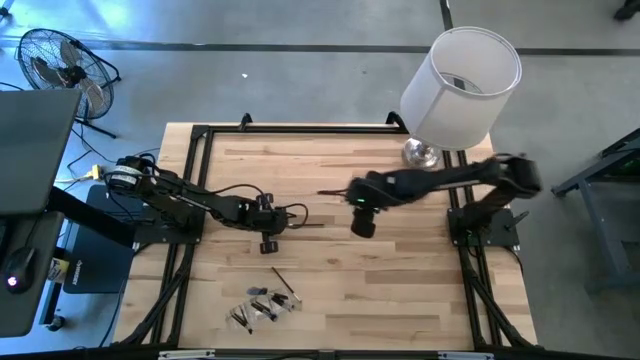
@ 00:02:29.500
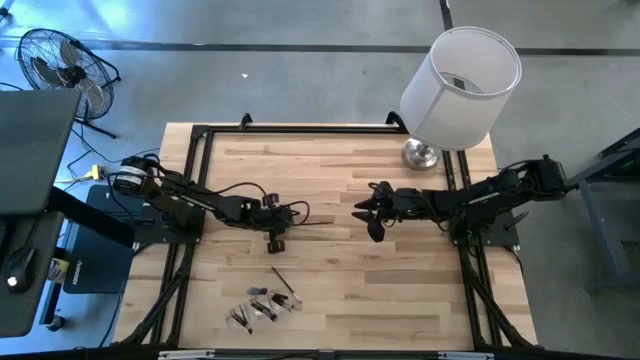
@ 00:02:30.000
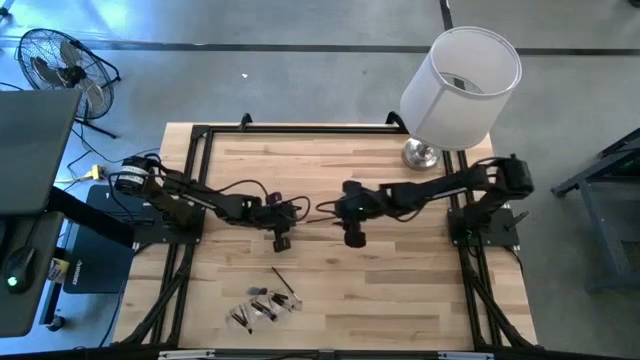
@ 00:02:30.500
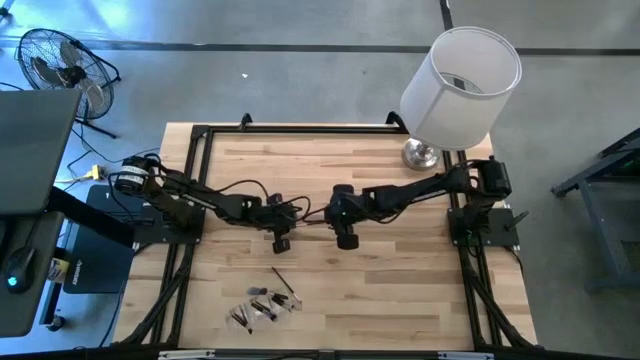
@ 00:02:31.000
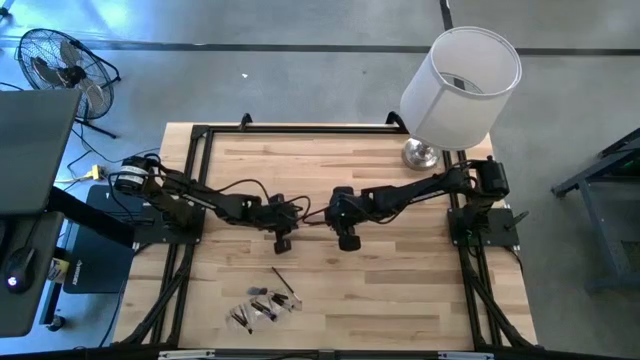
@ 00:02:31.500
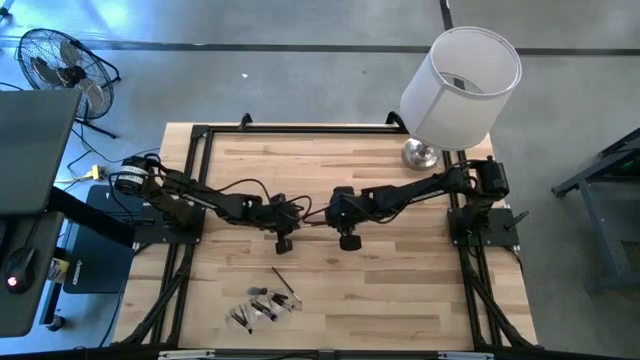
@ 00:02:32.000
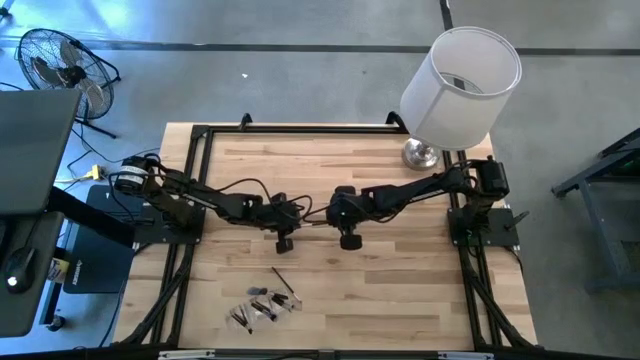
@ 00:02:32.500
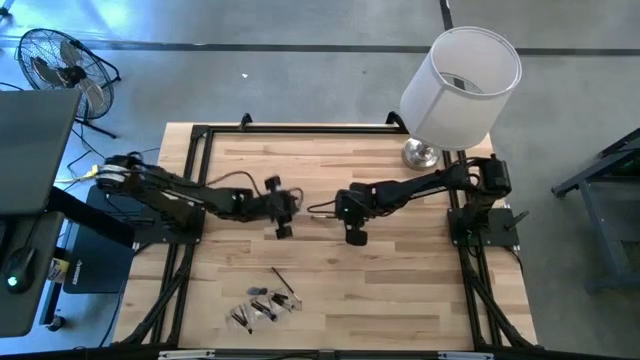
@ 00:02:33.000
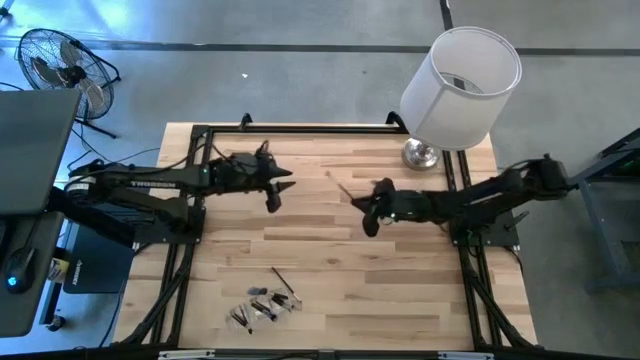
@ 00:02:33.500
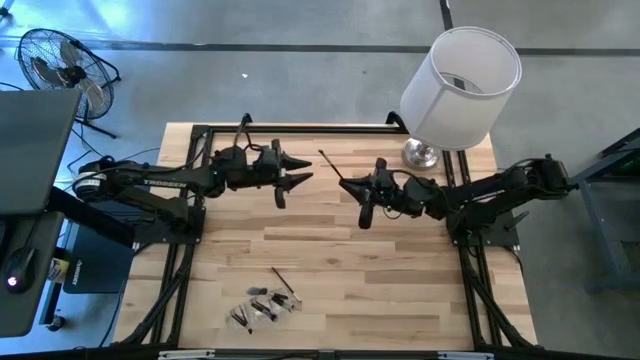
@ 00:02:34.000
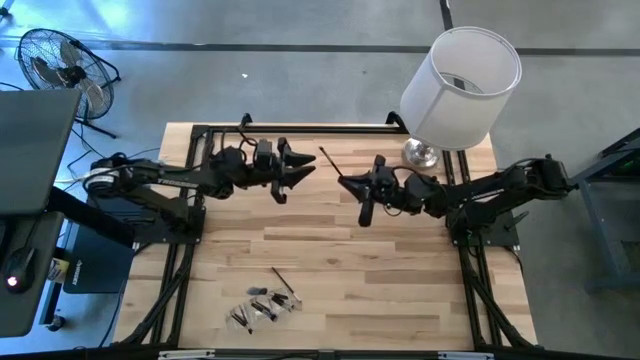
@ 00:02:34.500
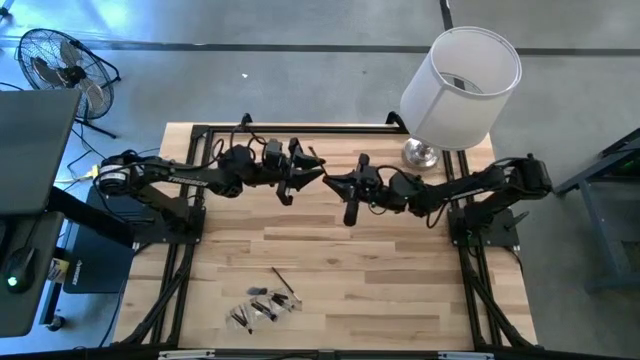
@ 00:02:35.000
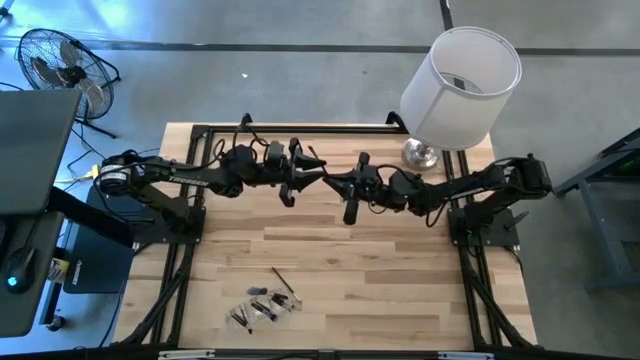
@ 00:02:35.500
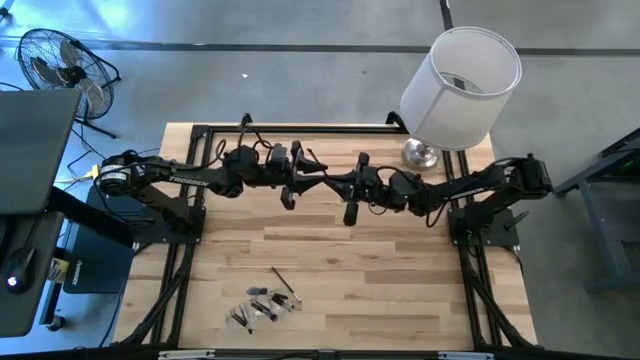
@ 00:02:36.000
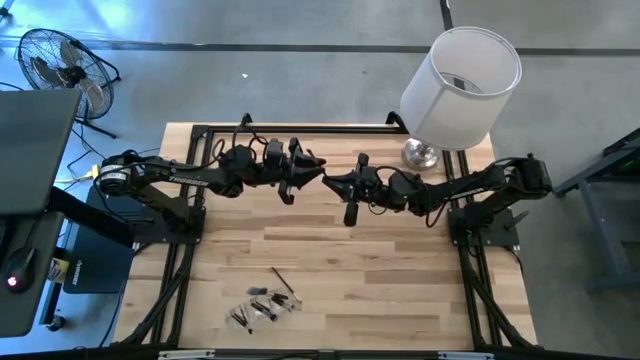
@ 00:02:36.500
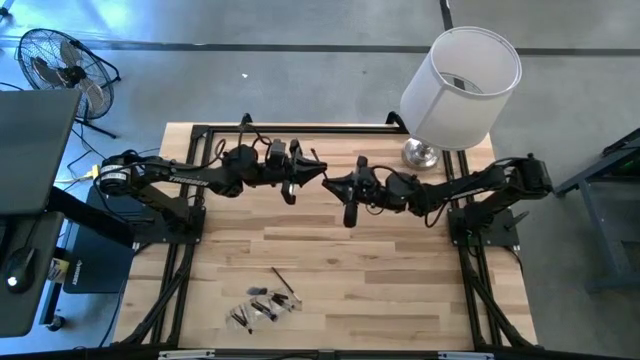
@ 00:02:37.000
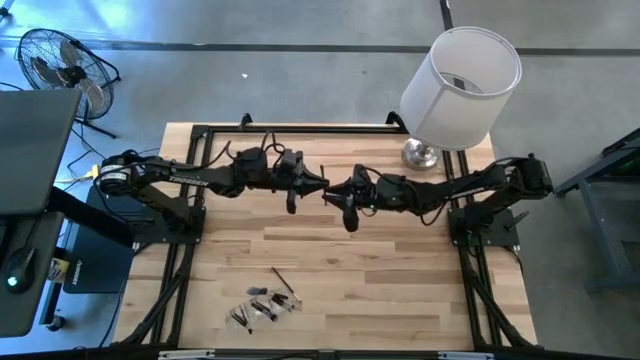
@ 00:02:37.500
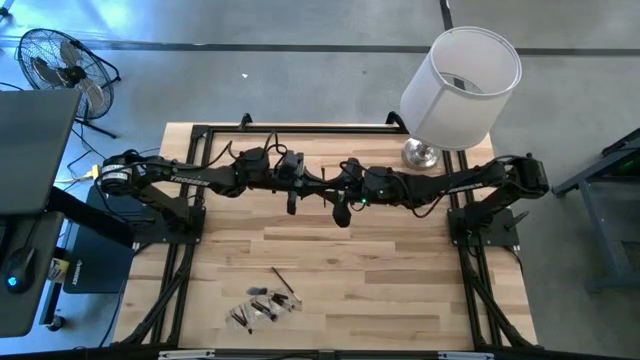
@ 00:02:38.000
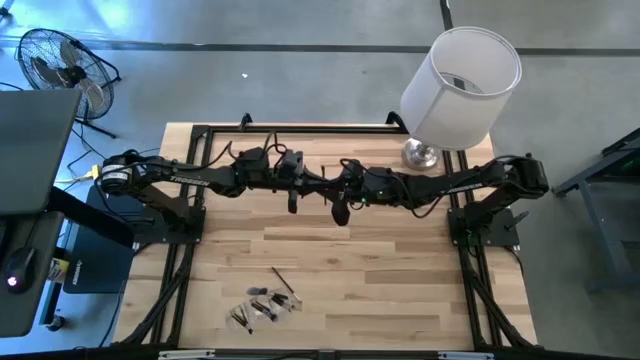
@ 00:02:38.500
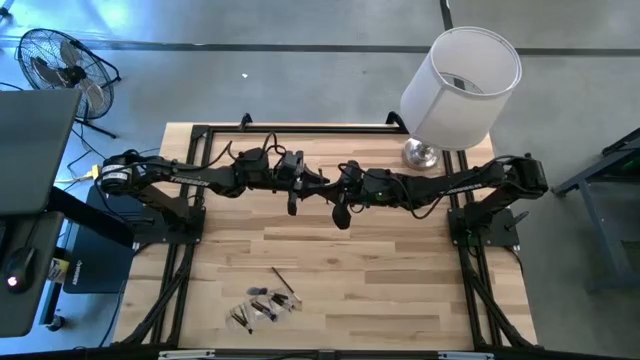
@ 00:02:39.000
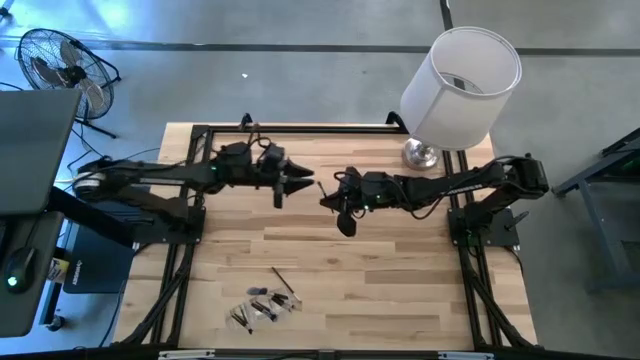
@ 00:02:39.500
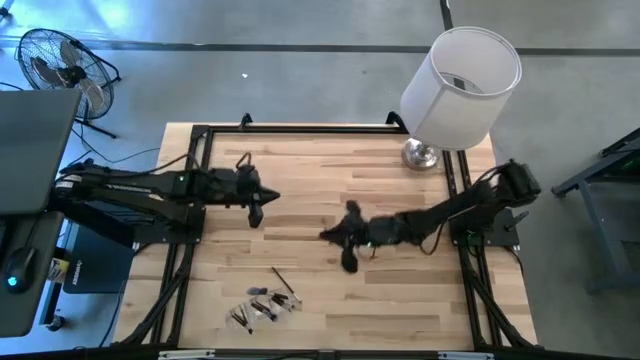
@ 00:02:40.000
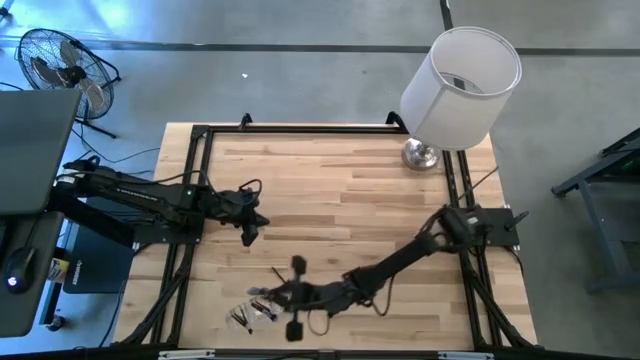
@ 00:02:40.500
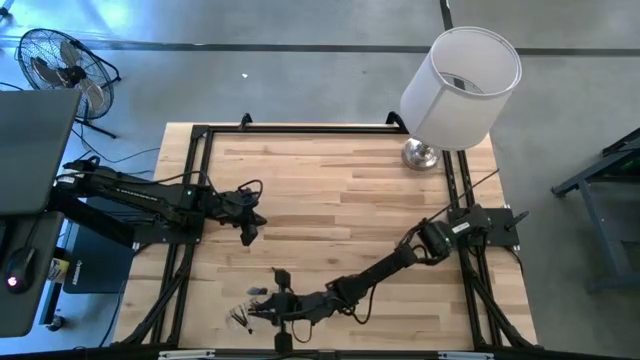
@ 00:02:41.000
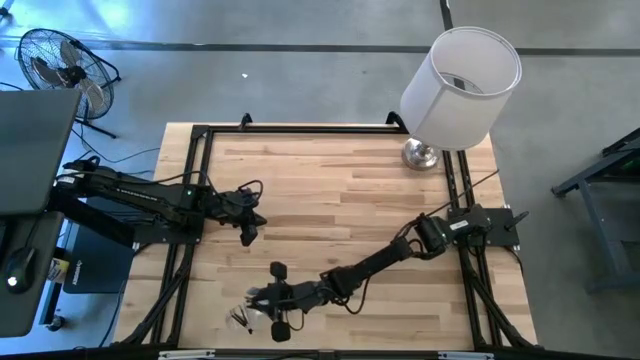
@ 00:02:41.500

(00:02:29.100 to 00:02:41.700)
Task: Pick & Place Makeup Supplies
Put the silver makeup brush into the transparent organizer

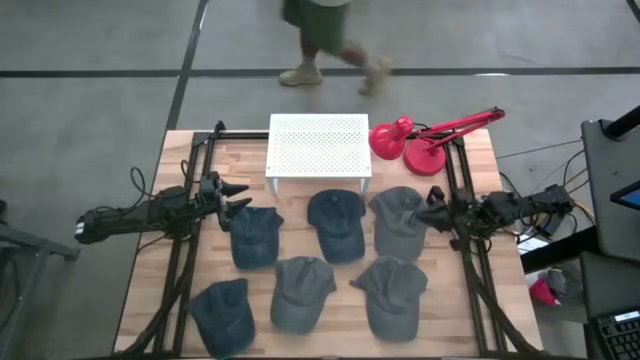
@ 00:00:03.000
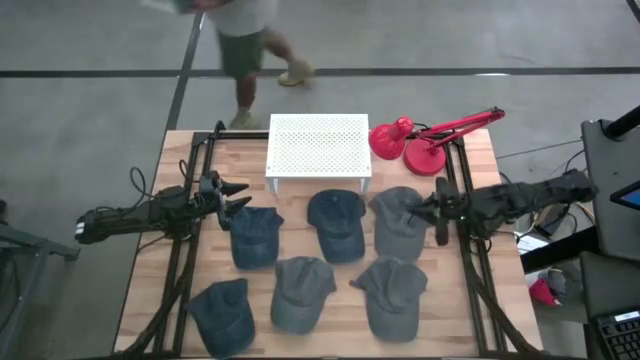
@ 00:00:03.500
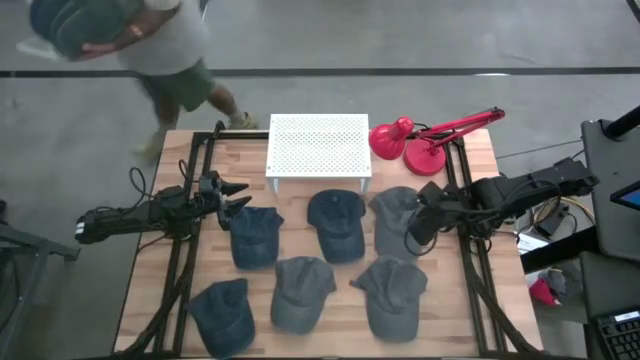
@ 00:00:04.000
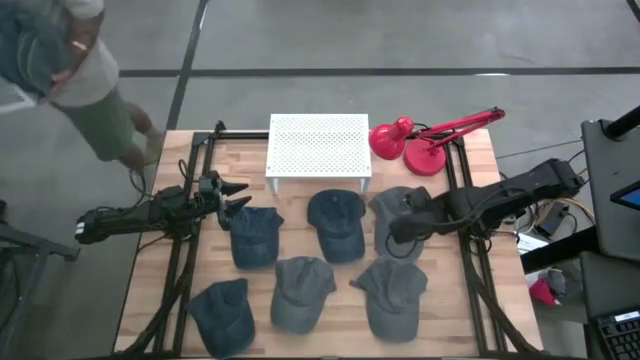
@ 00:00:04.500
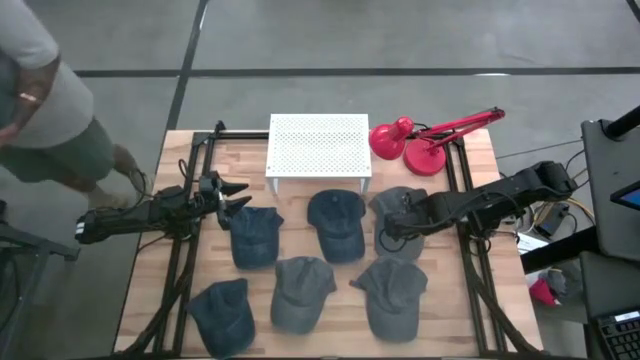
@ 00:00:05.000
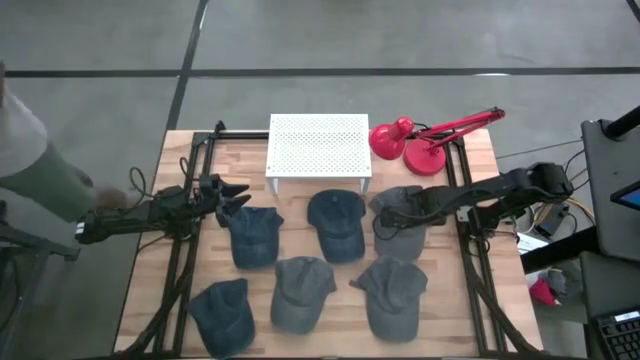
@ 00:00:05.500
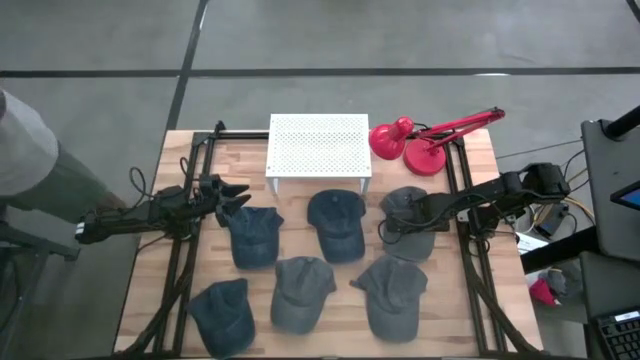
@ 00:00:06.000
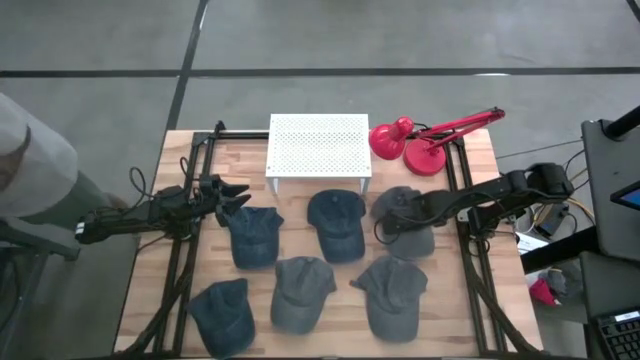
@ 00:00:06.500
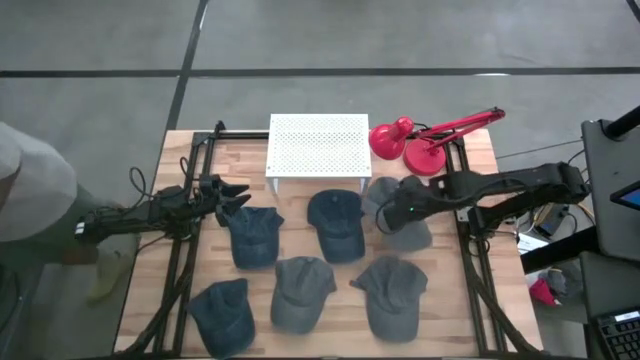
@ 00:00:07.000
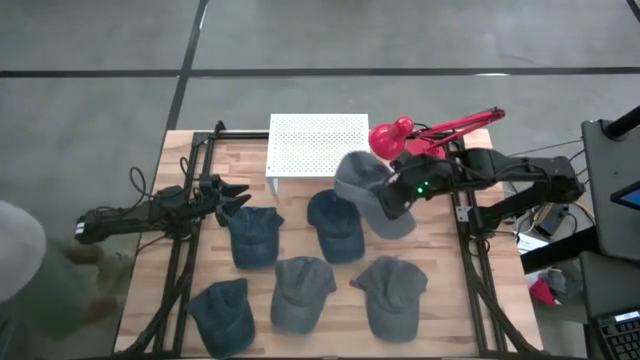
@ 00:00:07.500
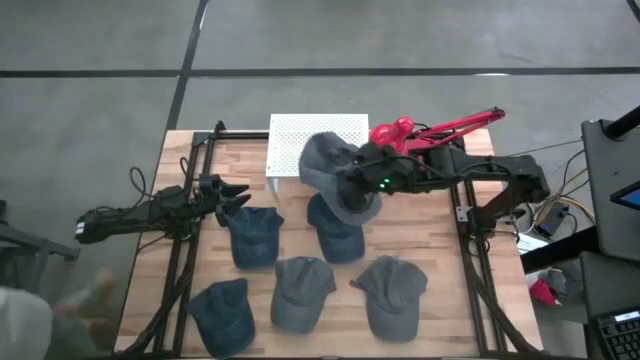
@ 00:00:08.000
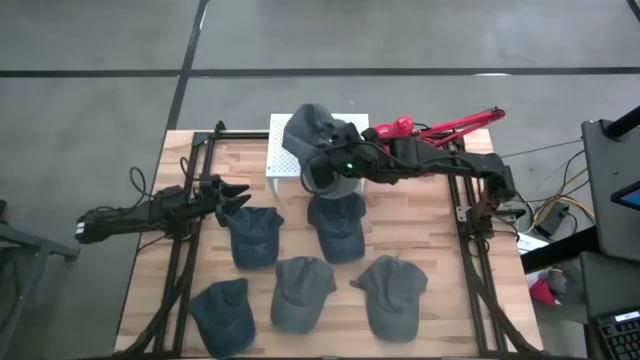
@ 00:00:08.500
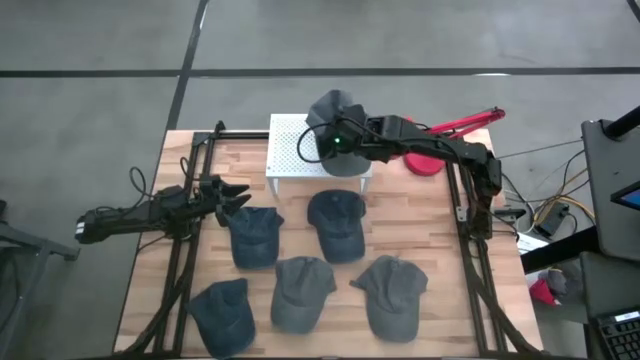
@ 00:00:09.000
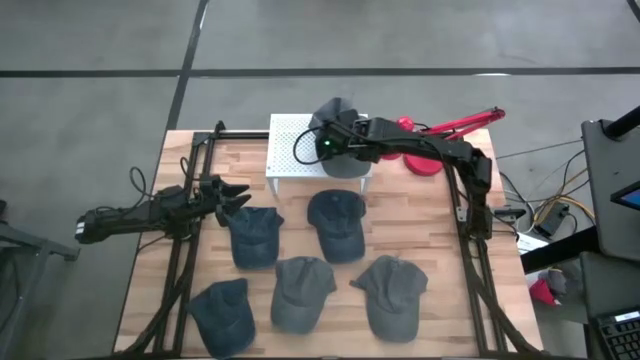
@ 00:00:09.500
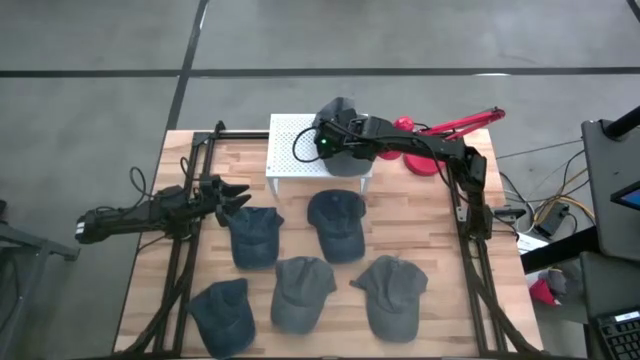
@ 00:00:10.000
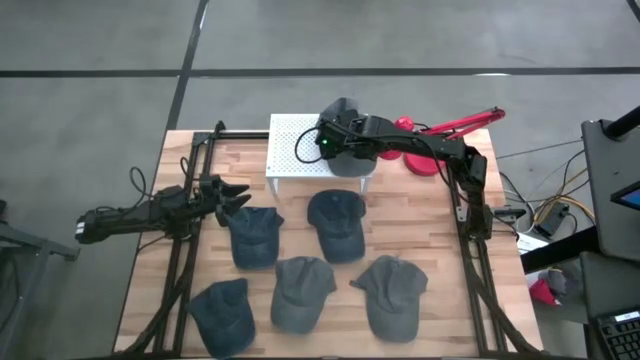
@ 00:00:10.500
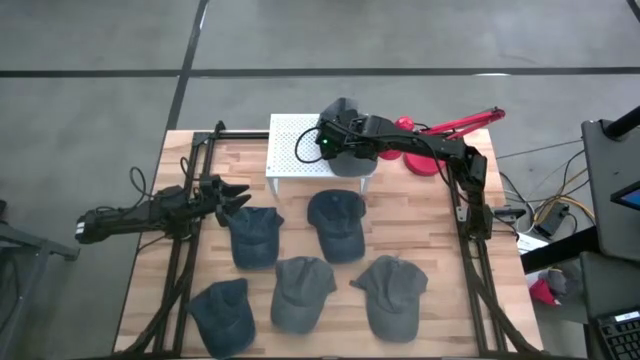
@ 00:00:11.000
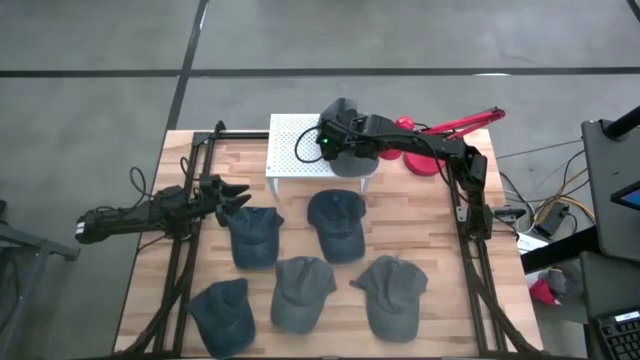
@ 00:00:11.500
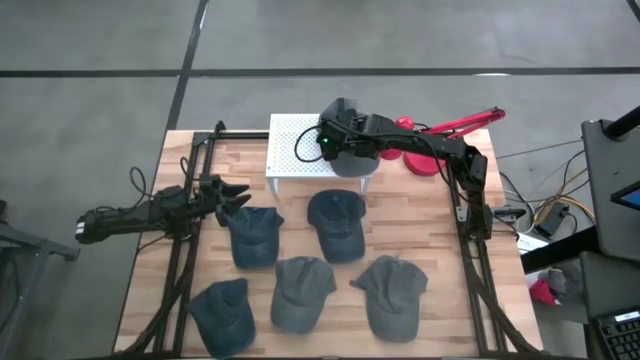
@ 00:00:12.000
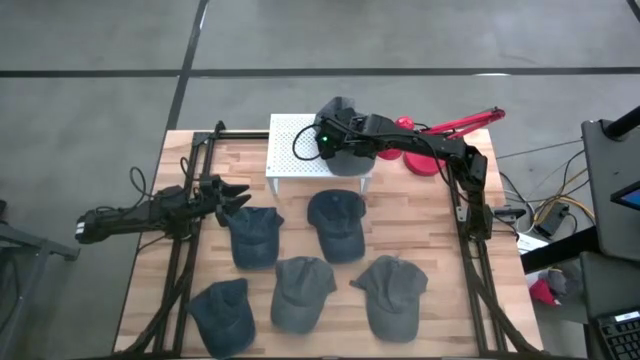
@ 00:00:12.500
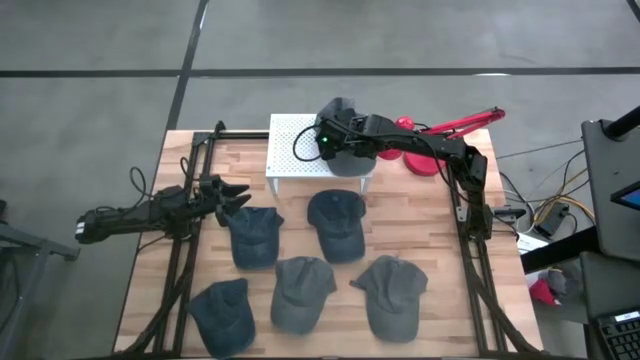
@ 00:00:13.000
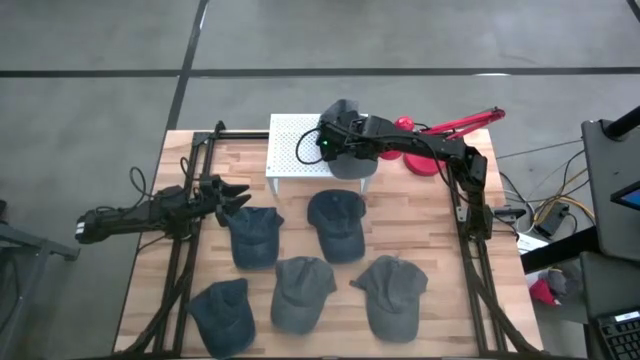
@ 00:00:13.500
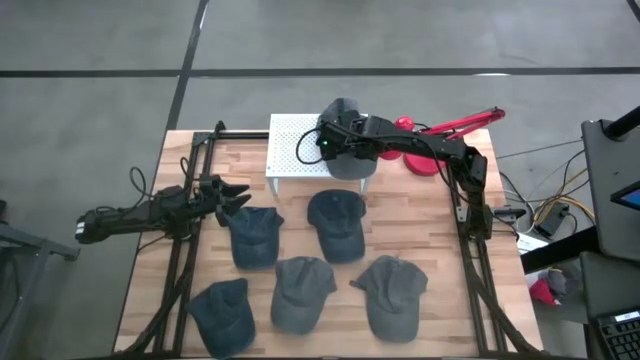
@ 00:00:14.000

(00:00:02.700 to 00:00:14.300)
Task: Pick & Place hat
Put the top right gray cap on the shelf
